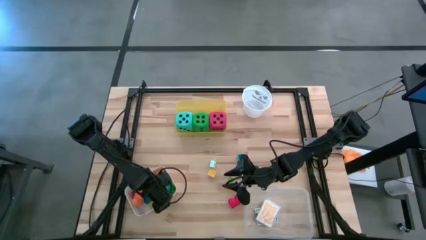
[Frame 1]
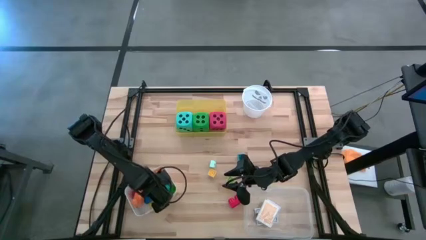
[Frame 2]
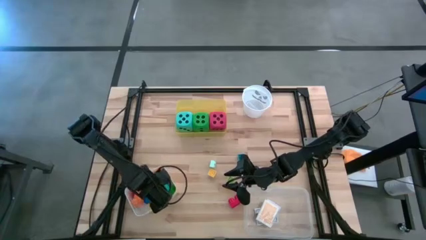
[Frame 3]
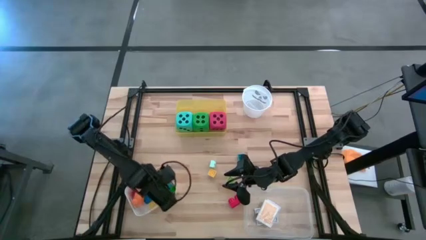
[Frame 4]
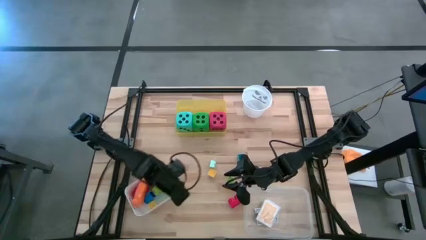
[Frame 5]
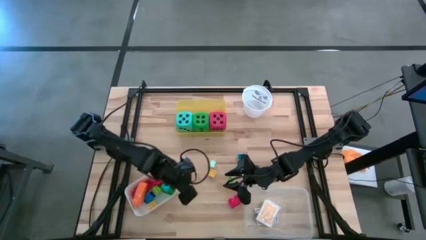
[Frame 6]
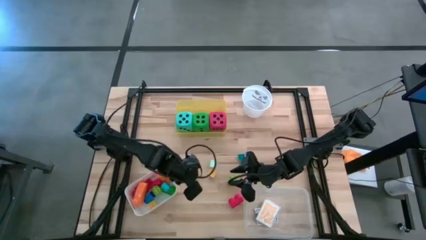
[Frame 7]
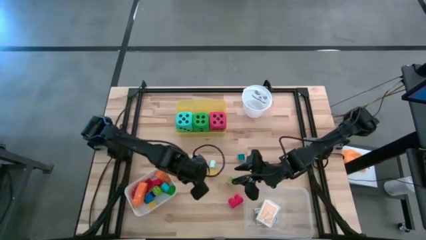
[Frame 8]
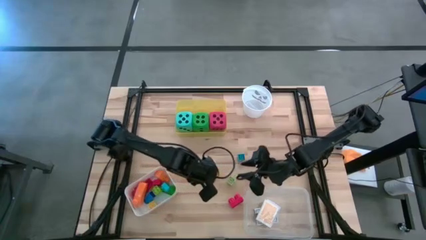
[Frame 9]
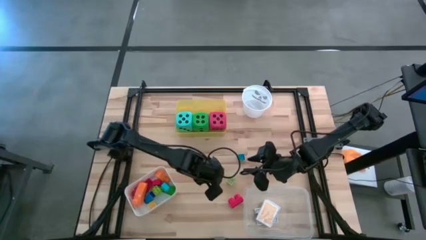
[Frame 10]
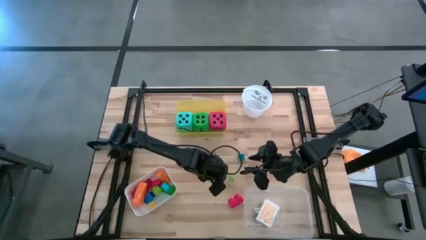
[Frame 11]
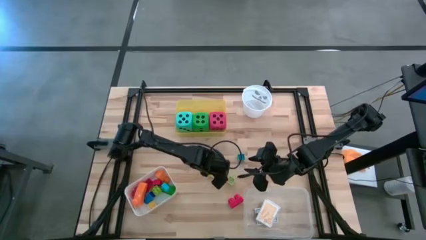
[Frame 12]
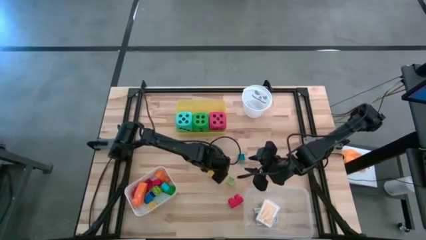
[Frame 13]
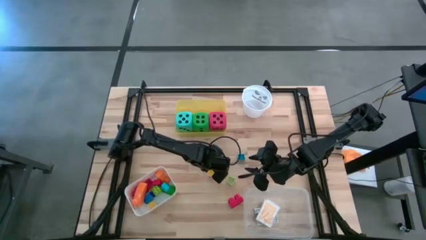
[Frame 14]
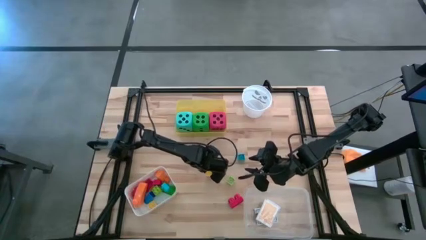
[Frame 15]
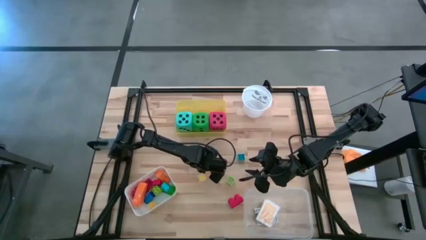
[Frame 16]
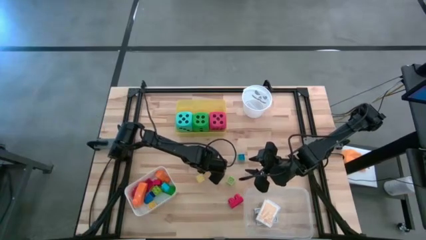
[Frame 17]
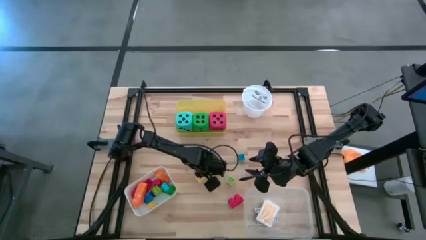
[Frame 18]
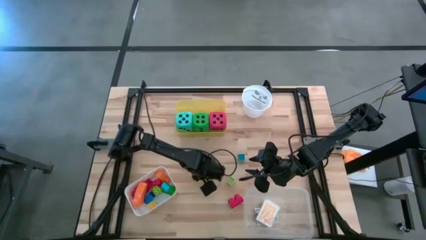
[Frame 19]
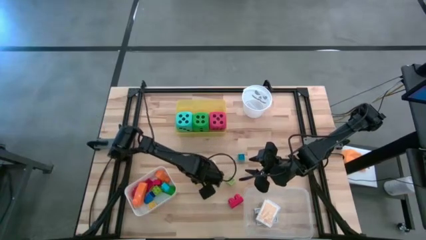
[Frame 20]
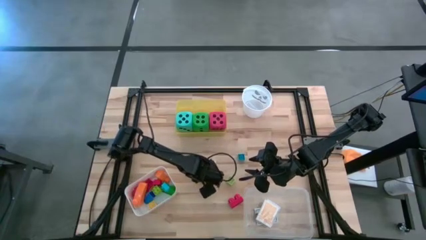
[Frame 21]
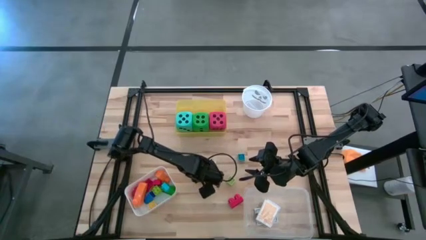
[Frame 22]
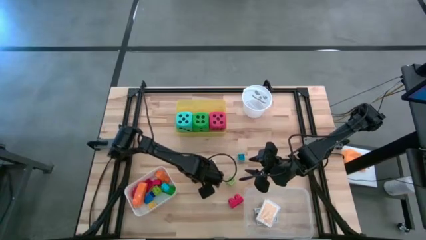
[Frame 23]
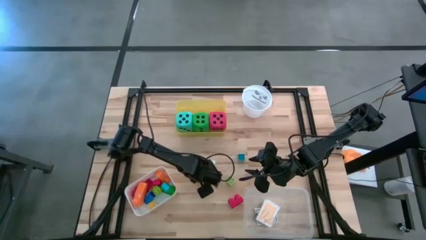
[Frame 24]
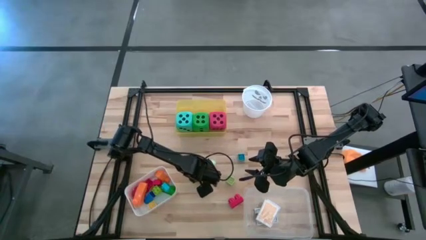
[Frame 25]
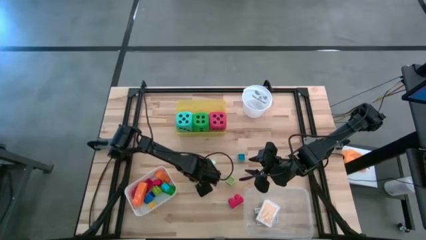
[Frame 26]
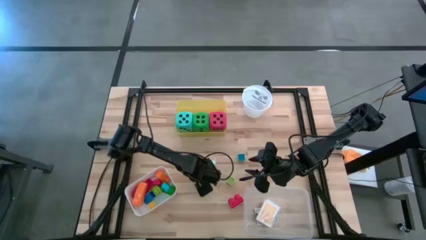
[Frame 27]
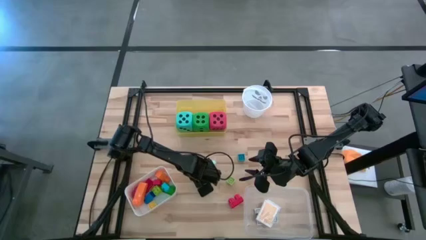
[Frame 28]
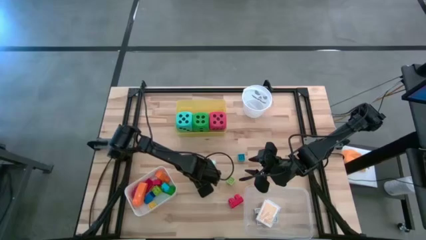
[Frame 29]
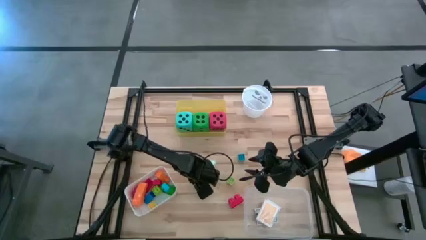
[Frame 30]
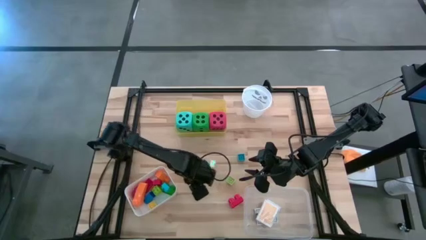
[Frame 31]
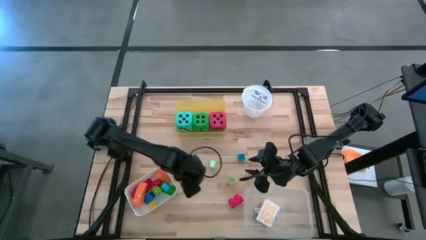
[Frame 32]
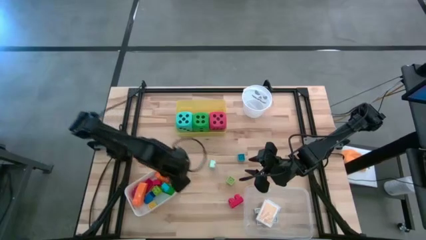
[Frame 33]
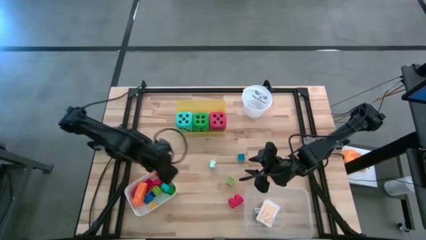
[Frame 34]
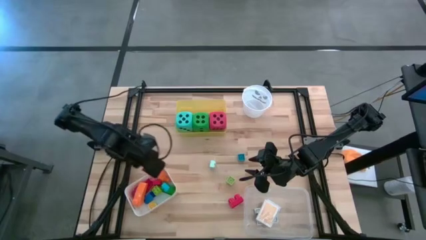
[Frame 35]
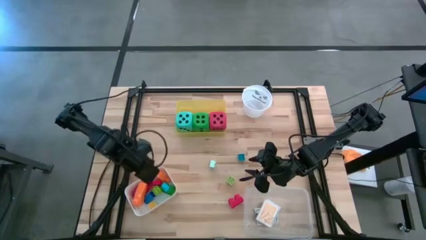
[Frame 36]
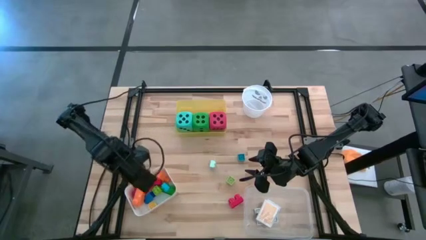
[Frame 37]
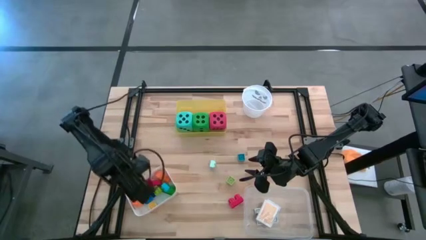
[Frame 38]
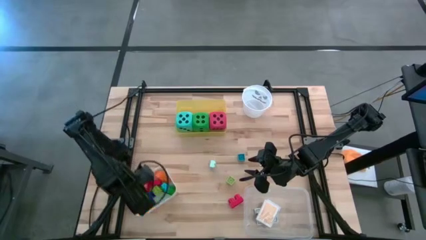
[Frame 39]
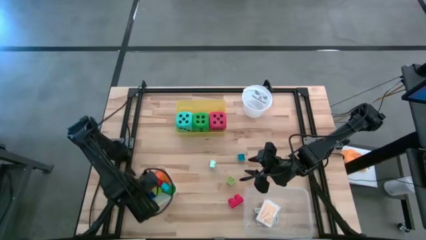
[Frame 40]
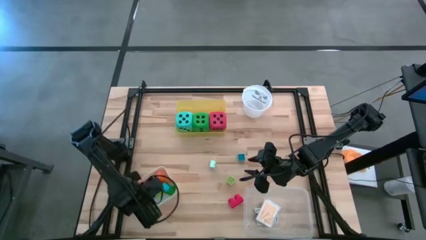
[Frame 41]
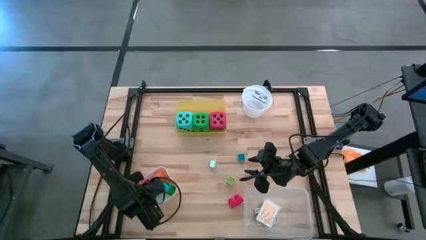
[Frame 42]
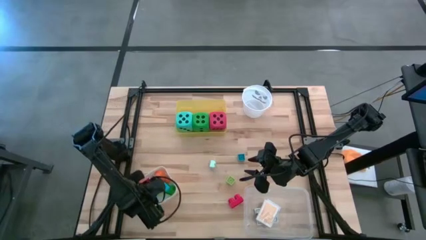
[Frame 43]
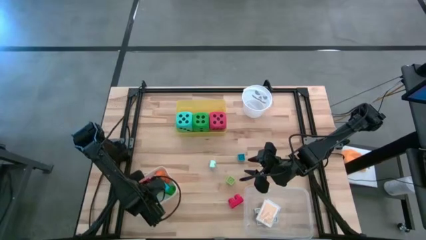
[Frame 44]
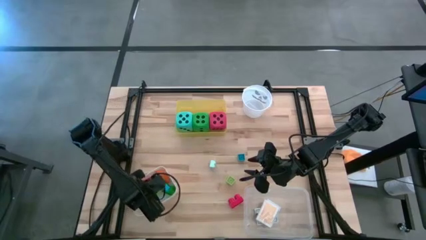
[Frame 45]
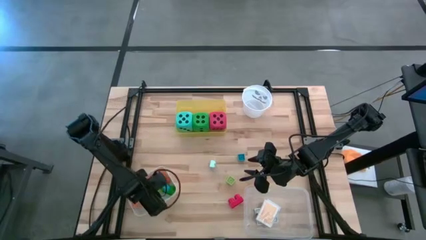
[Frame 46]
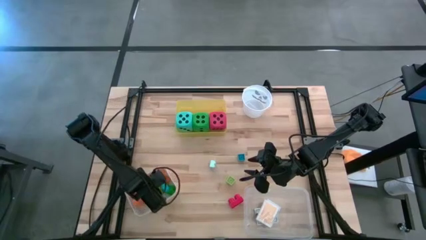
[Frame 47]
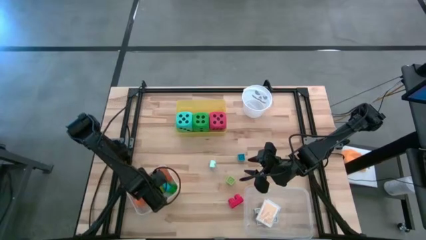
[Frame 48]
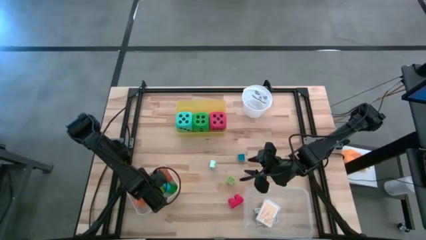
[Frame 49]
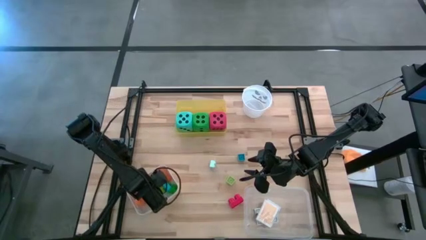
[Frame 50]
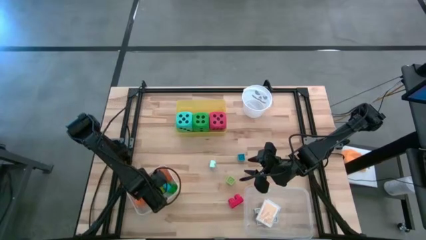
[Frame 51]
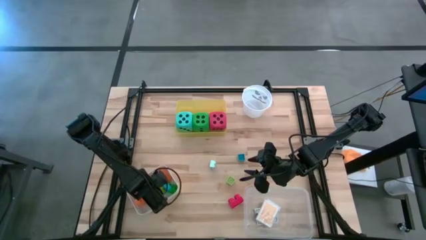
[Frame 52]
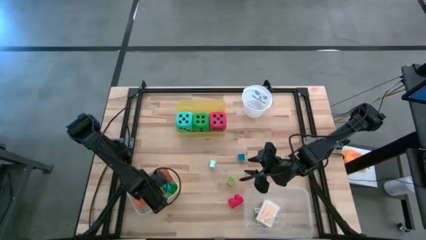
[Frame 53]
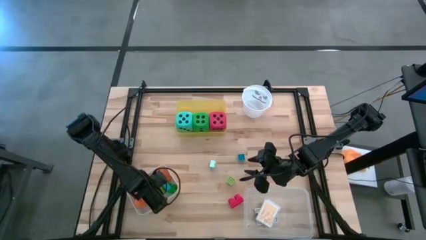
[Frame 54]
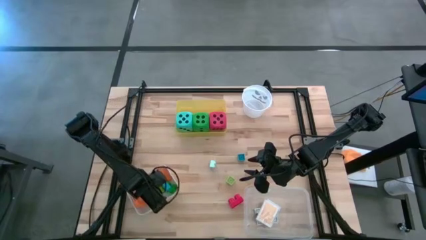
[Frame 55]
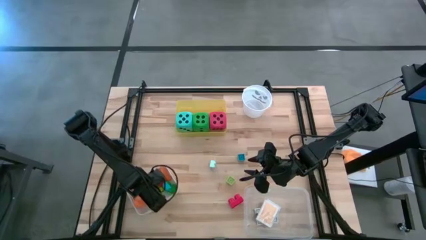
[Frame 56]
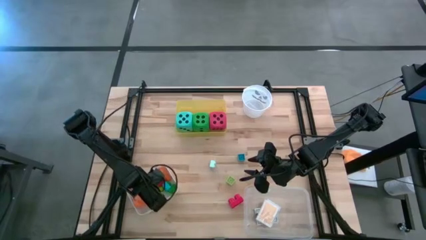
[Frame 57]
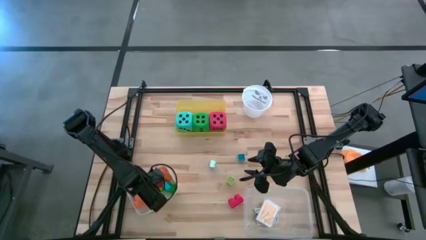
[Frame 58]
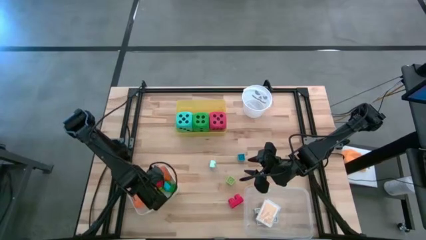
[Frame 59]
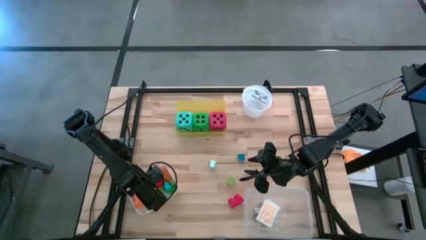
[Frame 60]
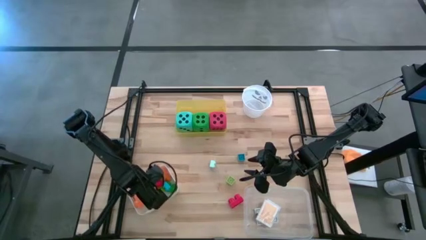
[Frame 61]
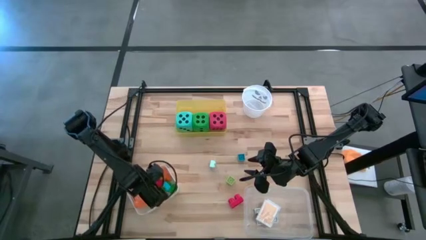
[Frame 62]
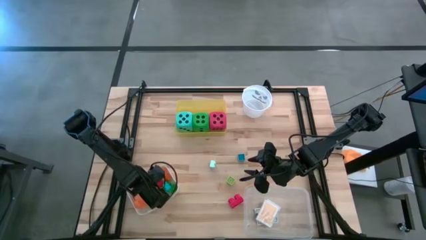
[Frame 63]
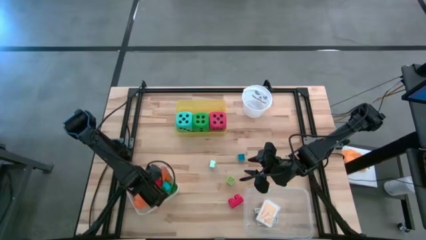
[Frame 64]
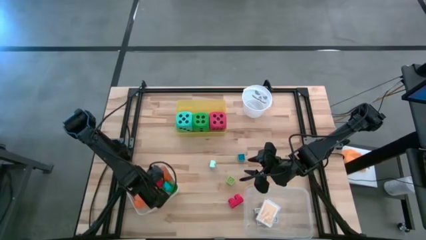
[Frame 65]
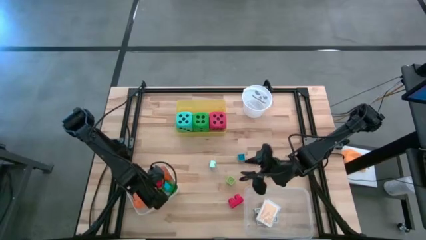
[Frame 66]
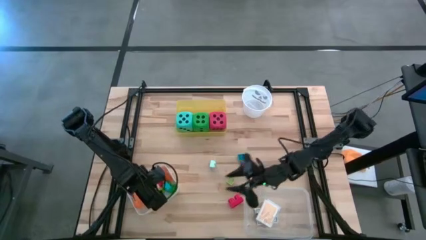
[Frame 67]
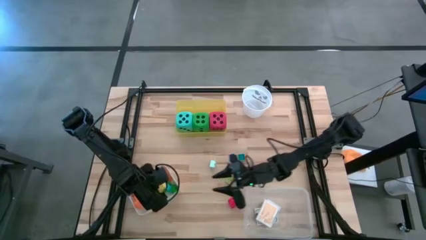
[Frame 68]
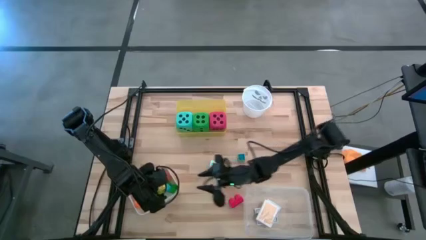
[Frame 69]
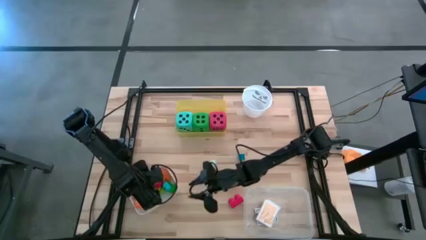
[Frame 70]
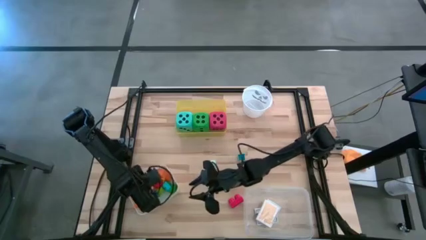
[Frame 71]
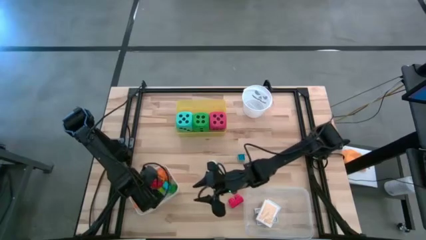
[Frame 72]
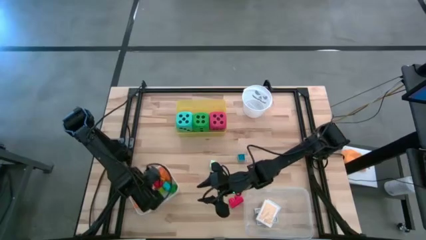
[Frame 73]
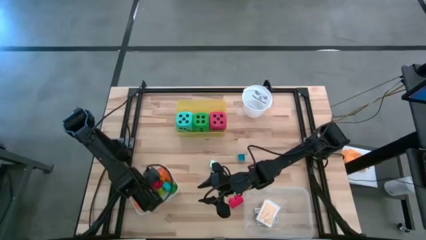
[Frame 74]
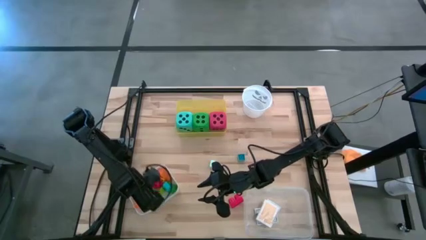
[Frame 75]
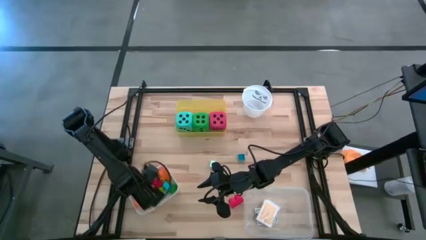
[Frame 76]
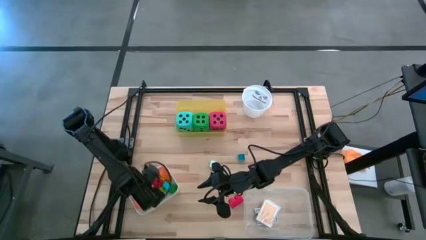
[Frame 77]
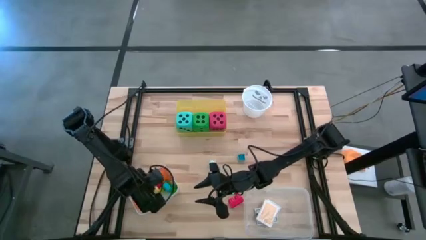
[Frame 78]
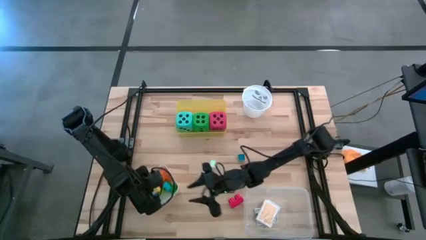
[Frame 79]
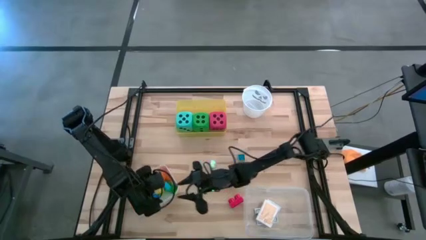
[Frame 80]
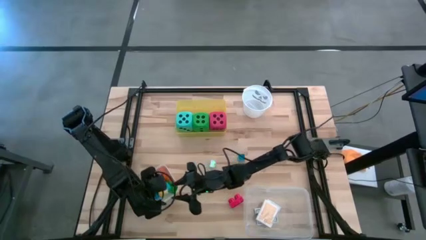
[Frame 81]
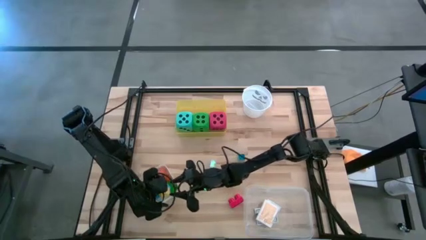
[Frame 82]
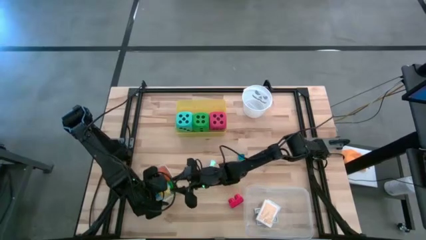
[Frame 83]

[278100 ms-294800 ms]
Task: Pick & Place Toys
Put the yellow game piece into the white bin
